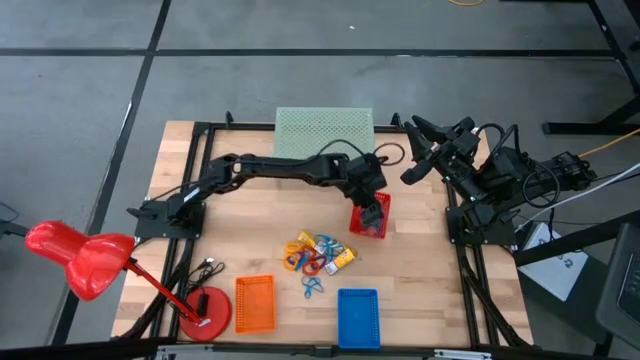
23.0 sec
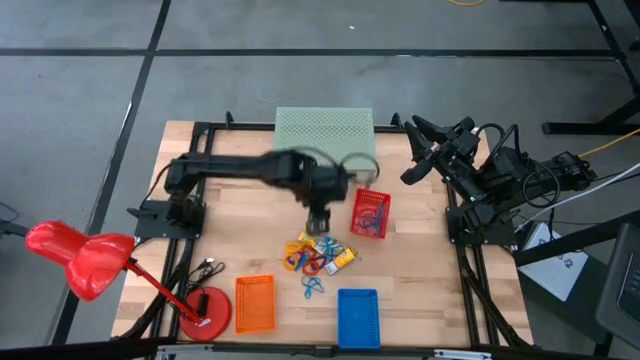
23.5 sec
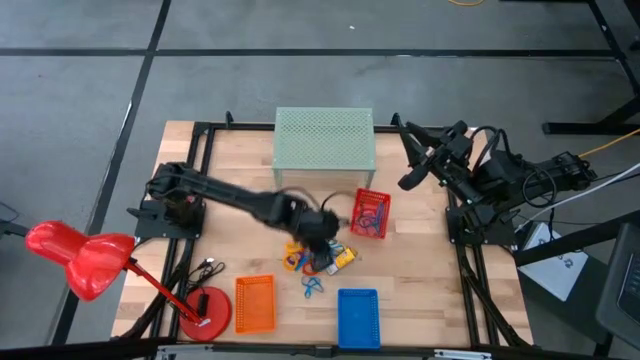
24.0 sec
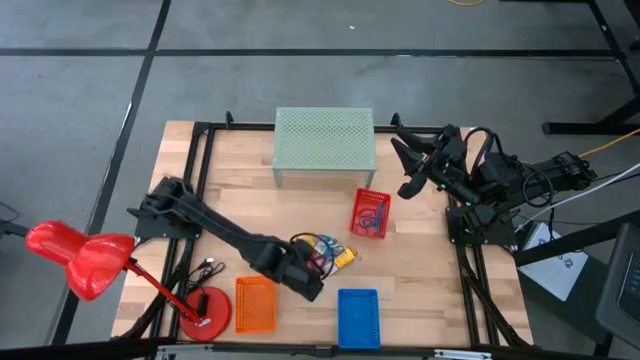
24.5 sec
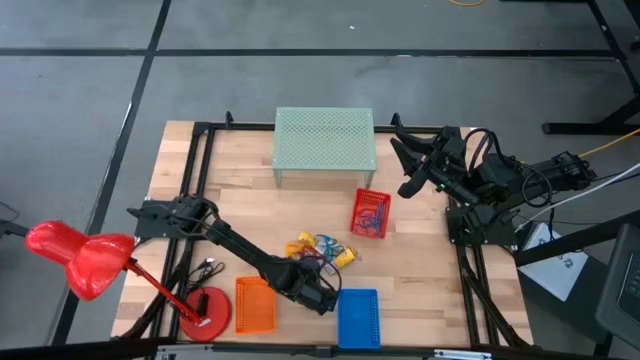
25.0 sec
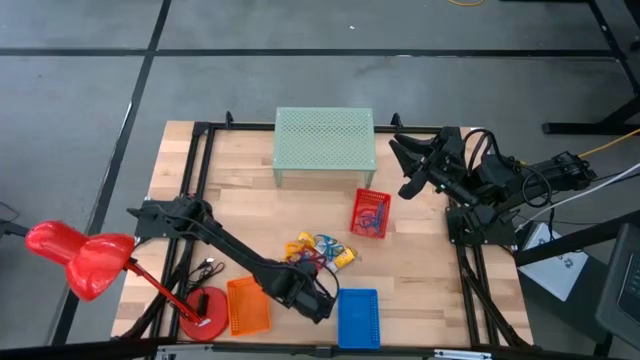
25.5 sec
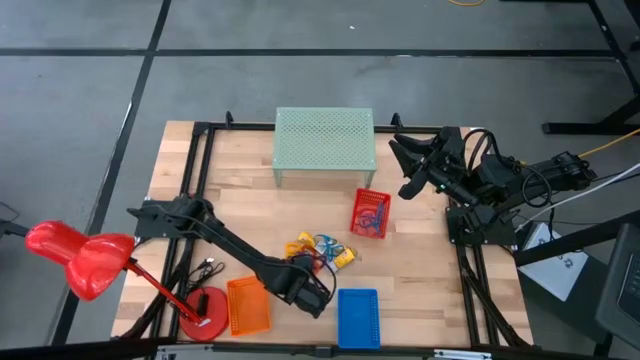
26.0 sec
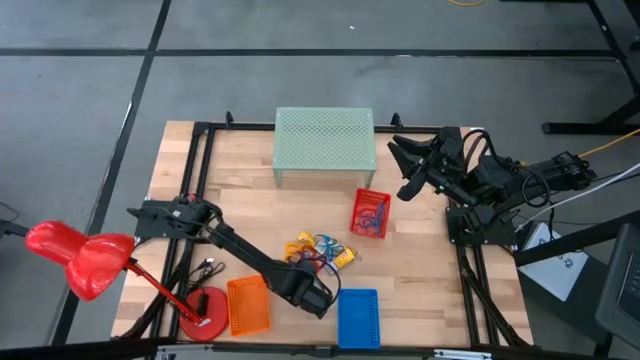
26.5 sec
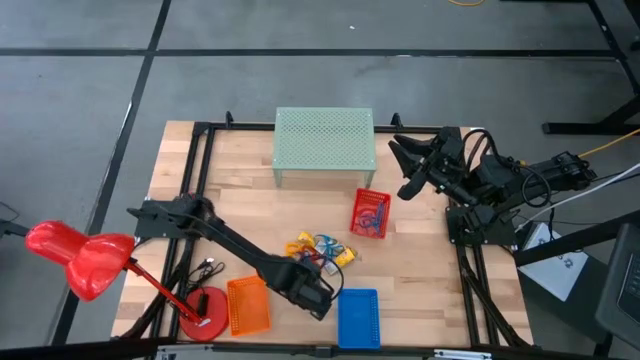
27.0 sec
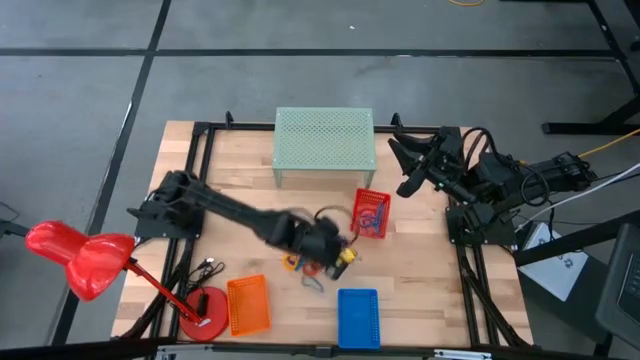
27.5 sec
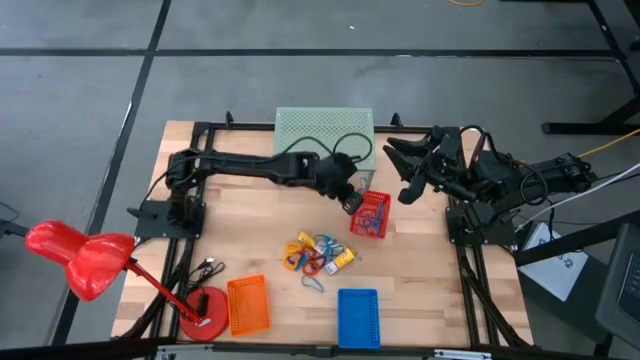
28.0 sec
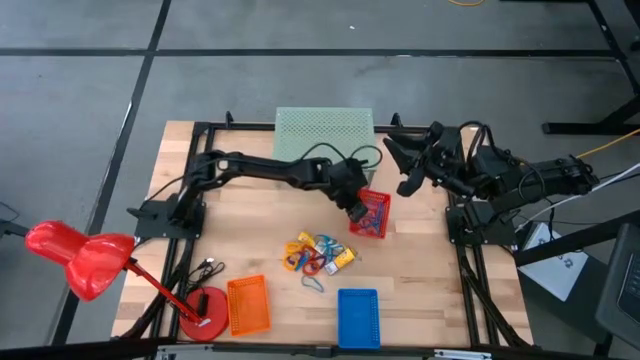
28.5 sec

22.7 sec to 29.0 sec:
Task: Pick & Place Office Desk Supplies
Put the blue rubber band into the red basket

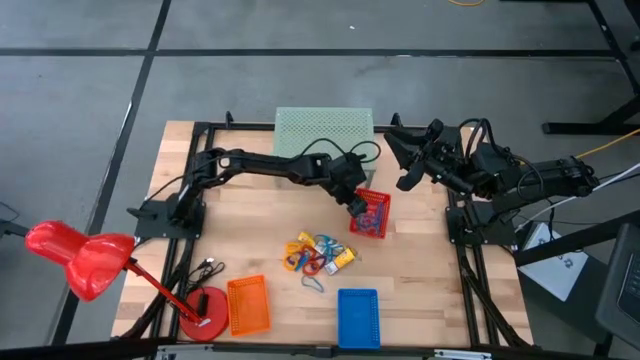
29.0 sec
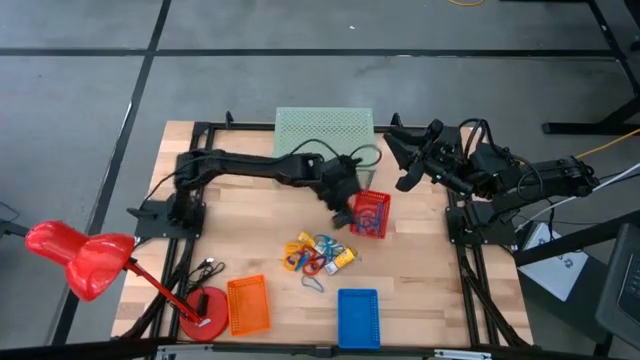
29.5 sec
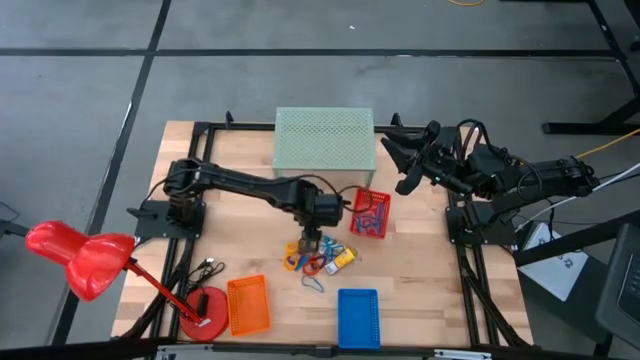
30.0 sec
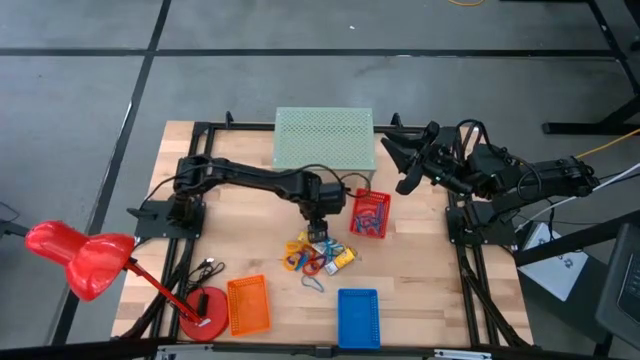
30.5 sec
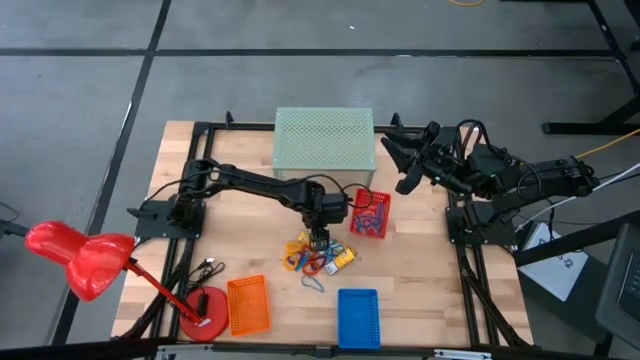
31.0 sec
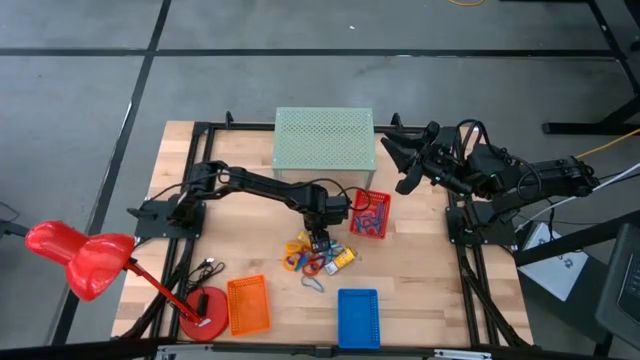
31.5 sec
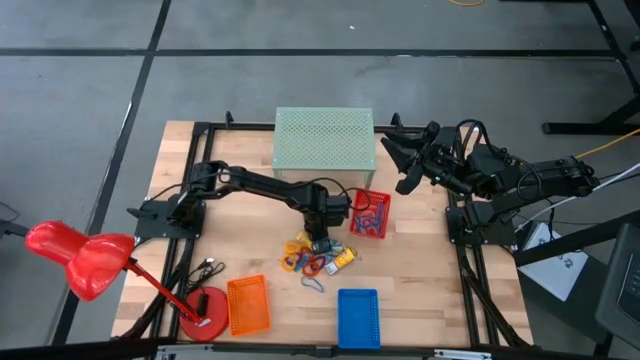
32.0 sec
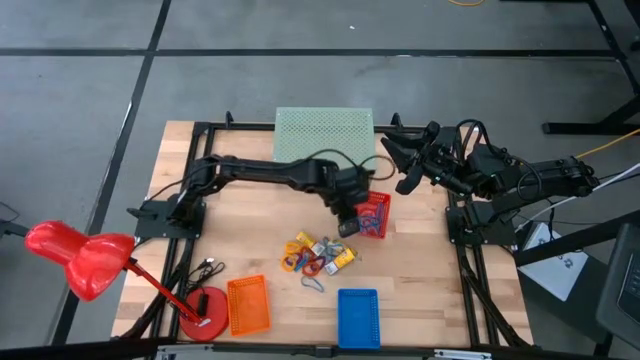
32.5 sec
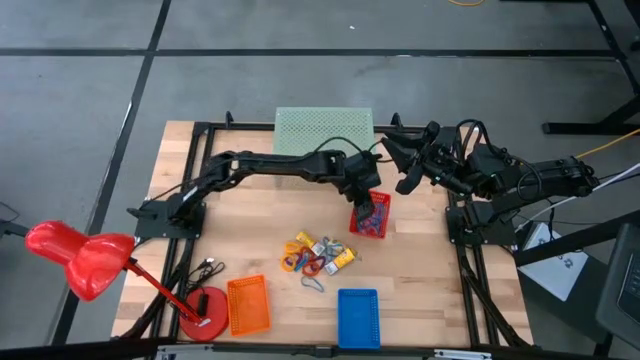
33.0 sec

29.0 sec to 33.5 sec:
Put the blue rubber band into the red basket

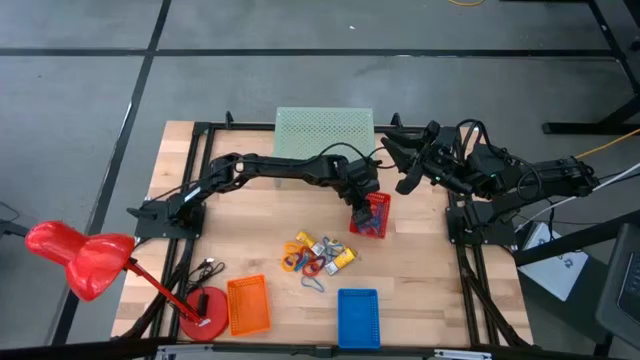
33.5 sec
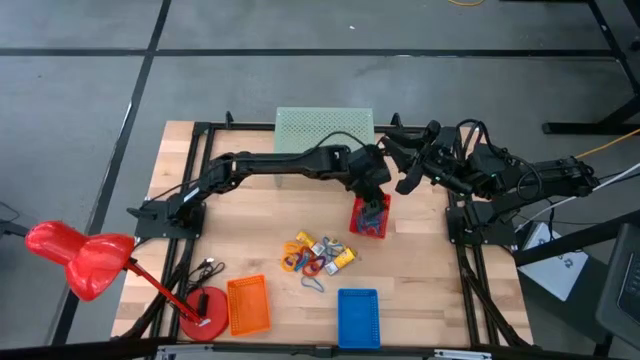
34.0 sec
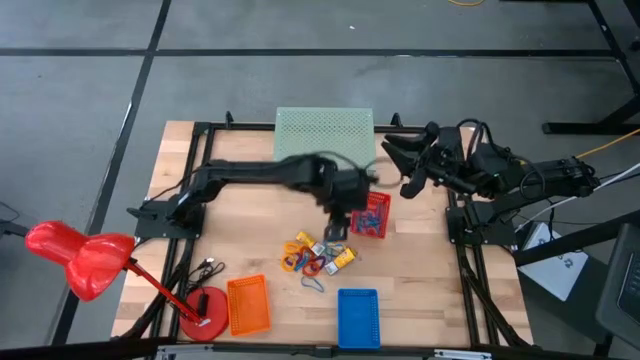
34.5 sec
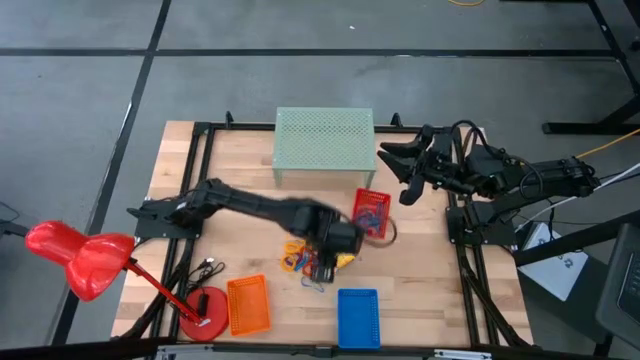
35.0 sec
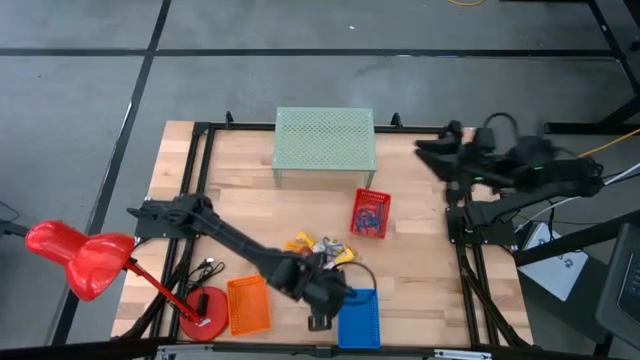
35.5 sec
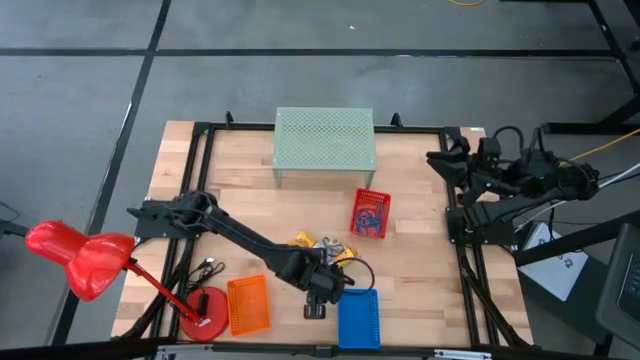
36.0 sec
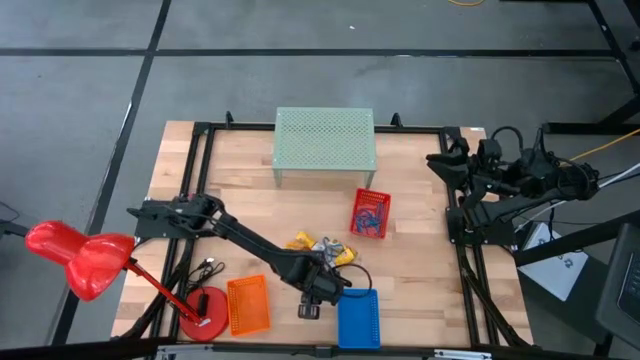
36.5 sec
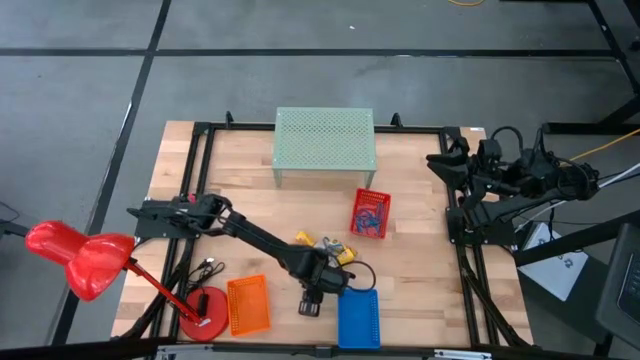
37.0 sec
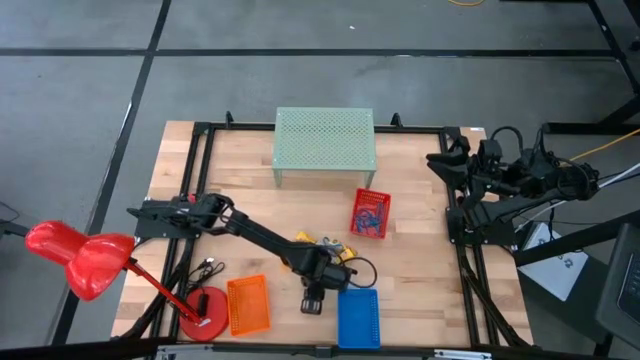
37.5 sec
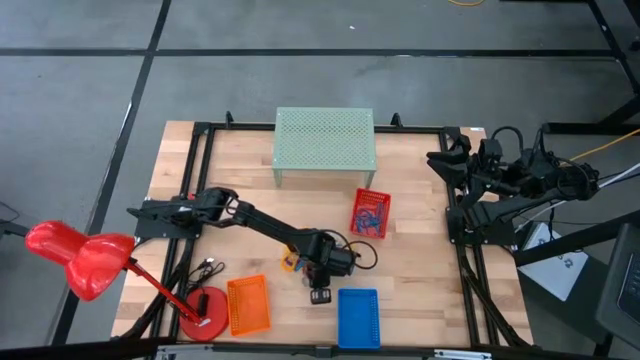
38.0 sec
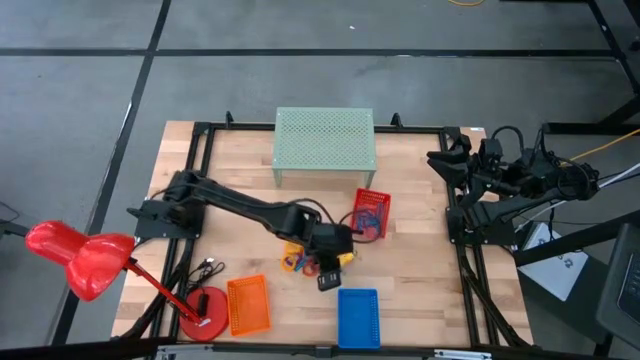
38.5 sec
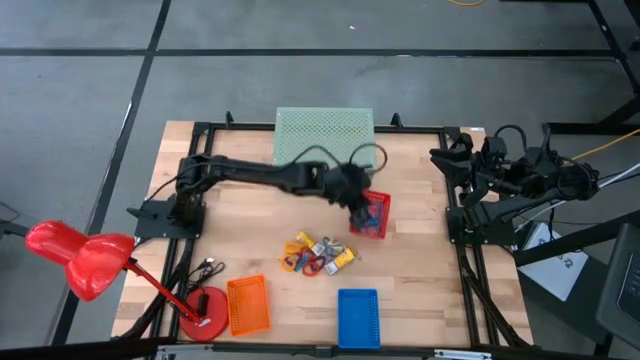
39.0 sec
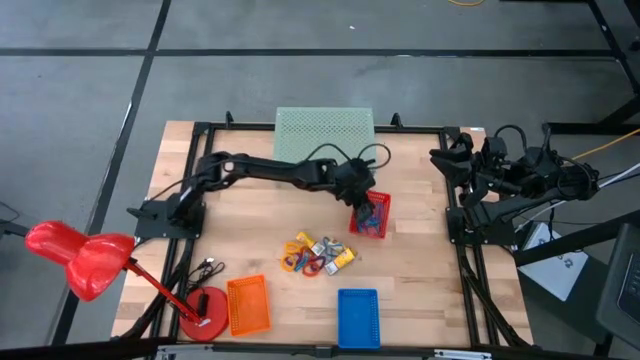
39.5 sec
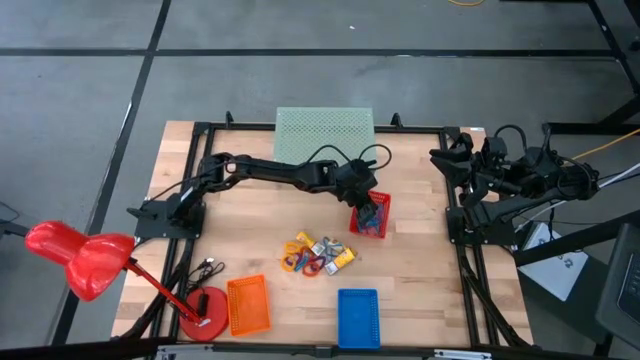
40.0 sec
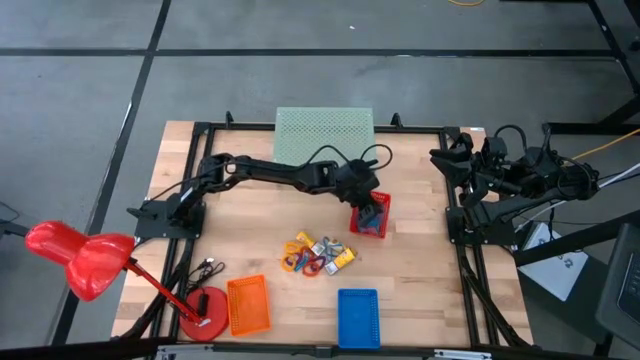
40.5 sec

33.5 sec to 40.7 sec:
Put the blue rubber band into the red basket

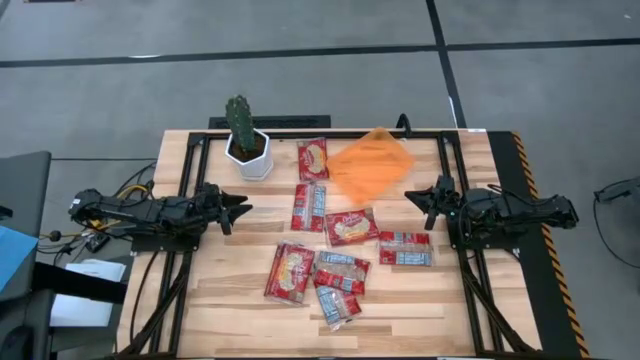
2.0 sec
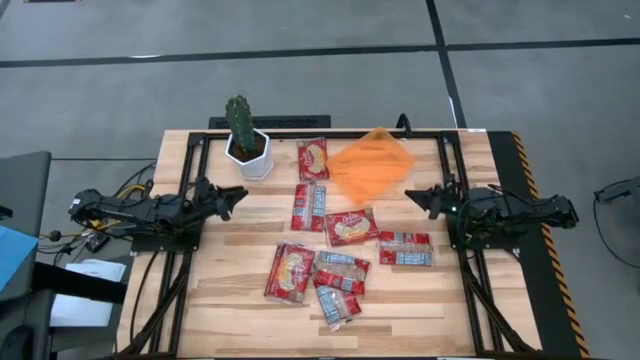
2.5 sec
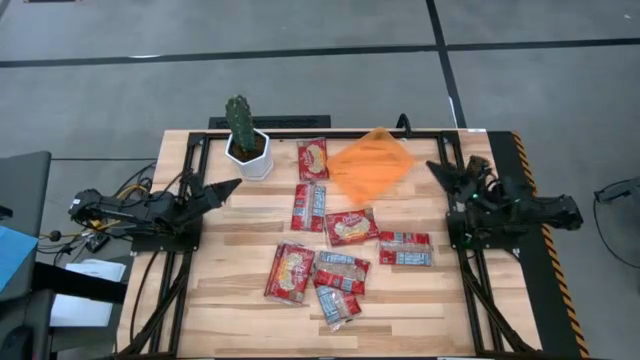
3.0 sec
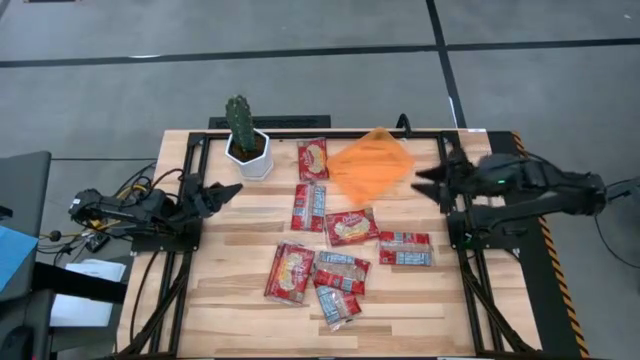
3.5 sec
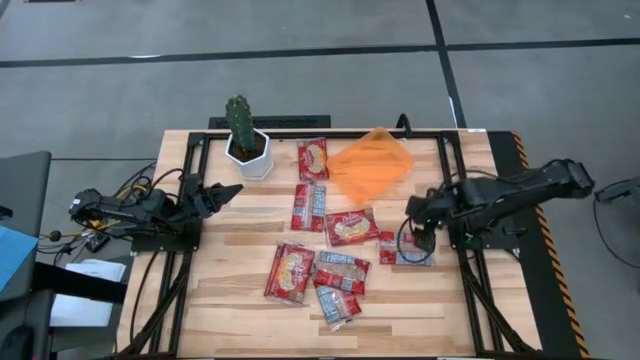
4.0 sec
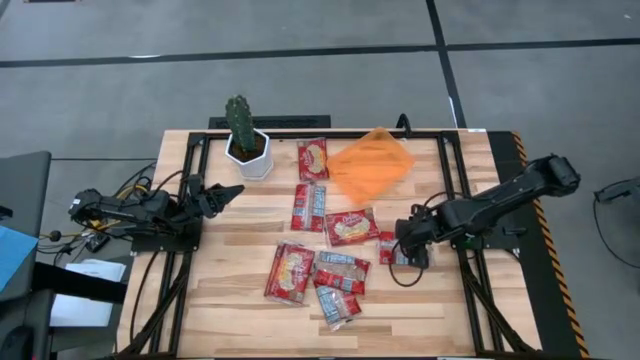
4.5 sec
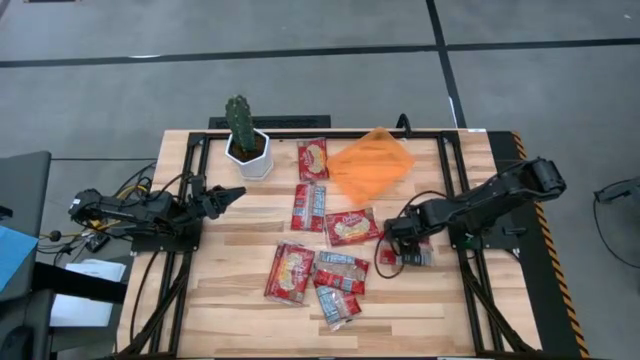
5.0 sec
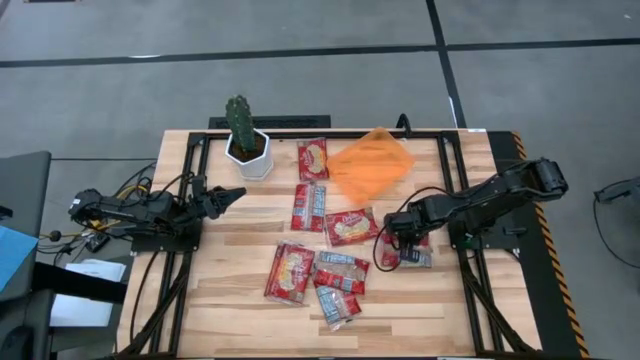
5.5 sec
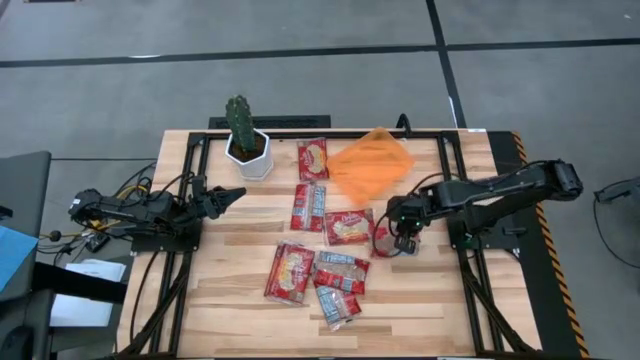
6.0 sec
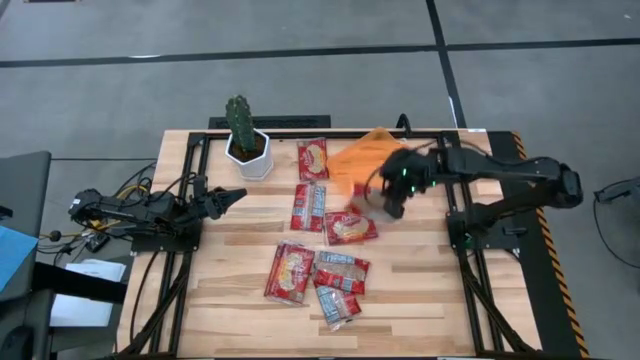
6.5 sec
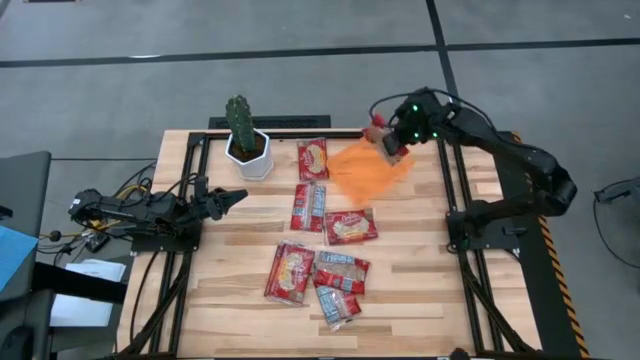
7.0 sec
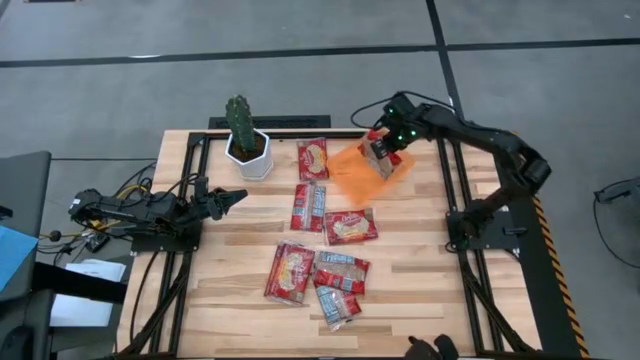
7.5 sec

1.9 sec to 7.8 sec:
Task: Sort popcorn bags into baskets
Put the popcorn bag into the orange bin
